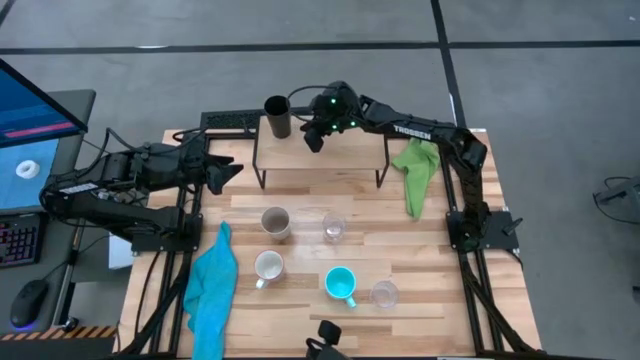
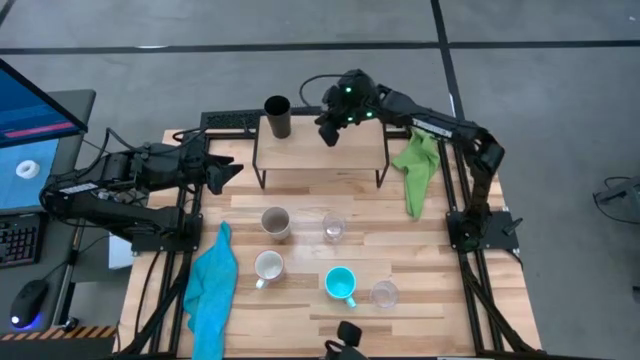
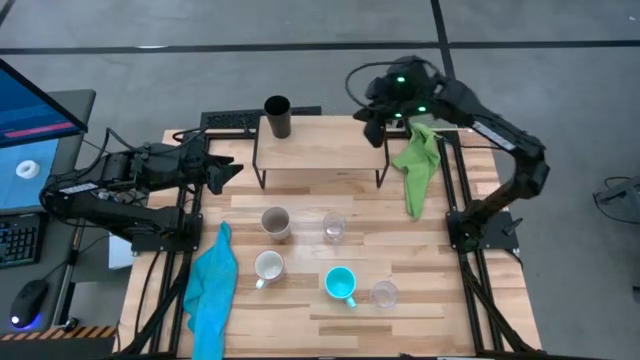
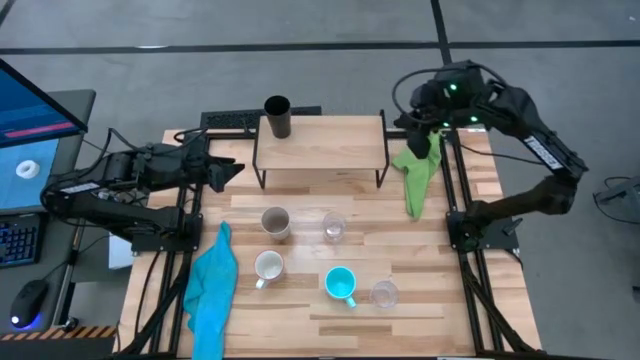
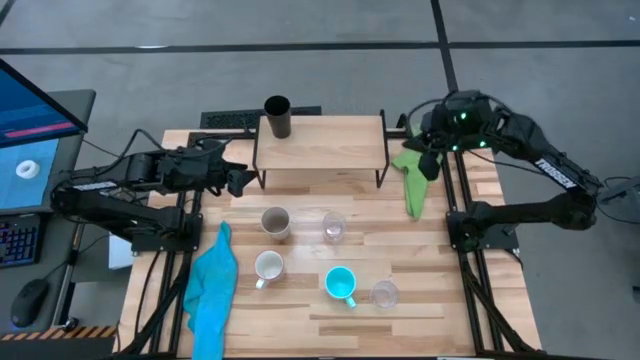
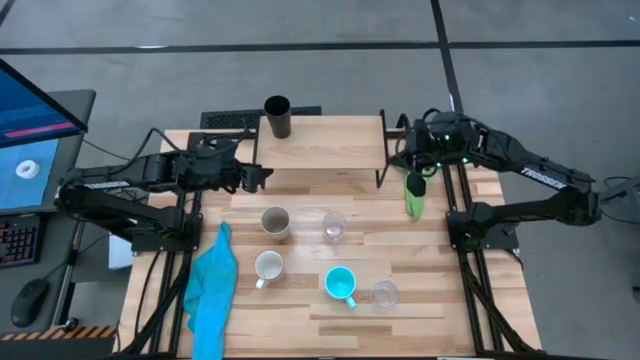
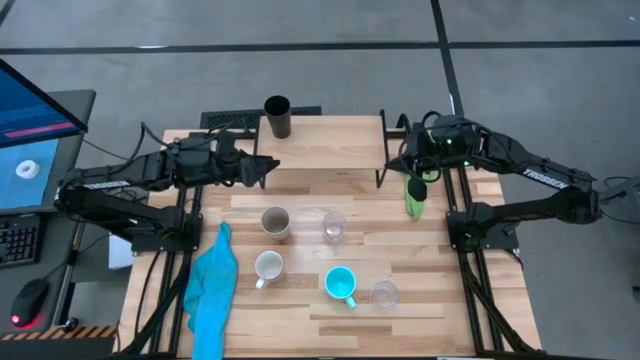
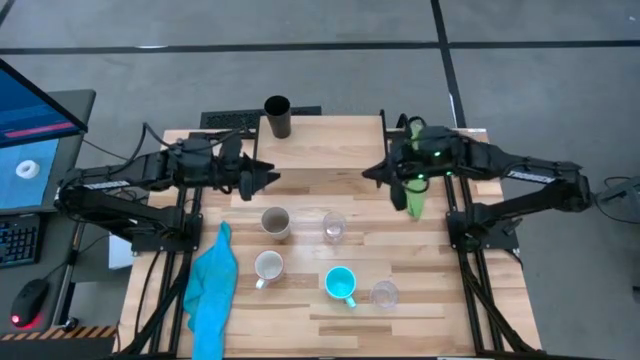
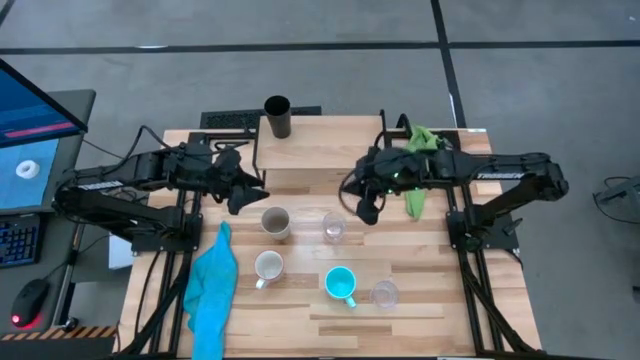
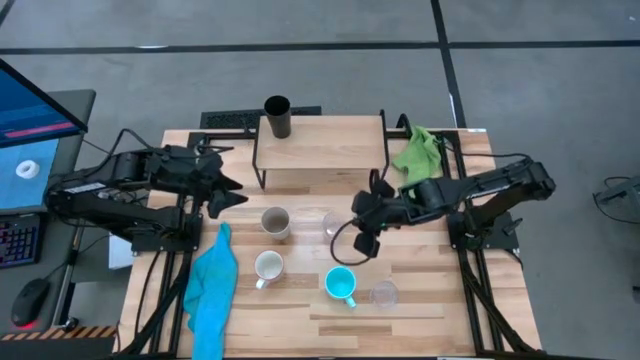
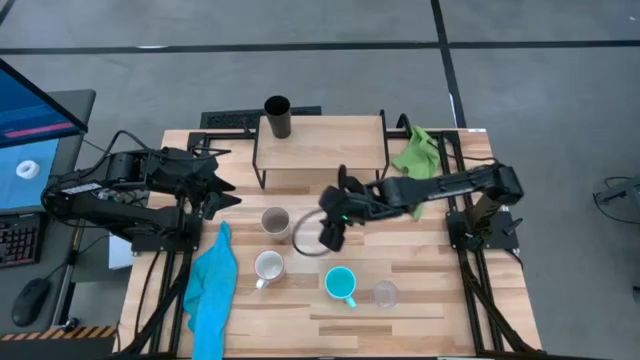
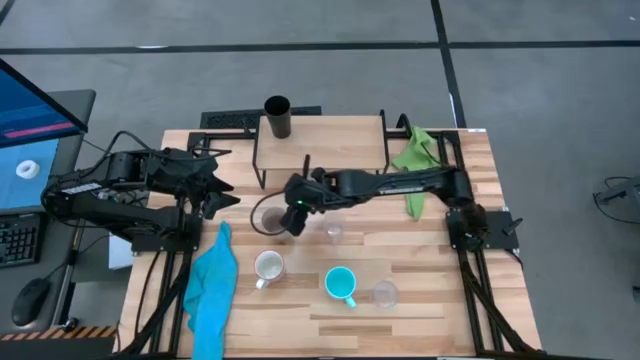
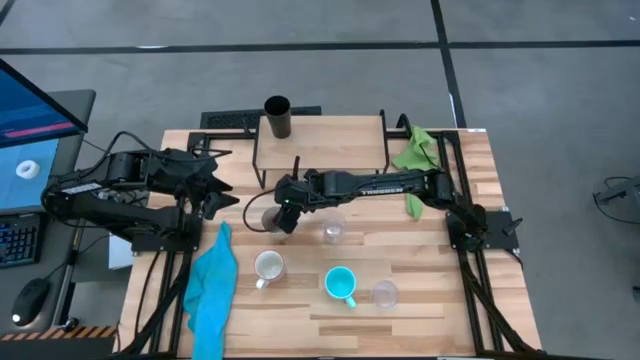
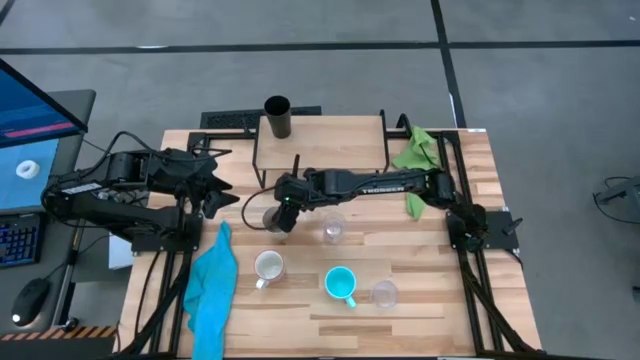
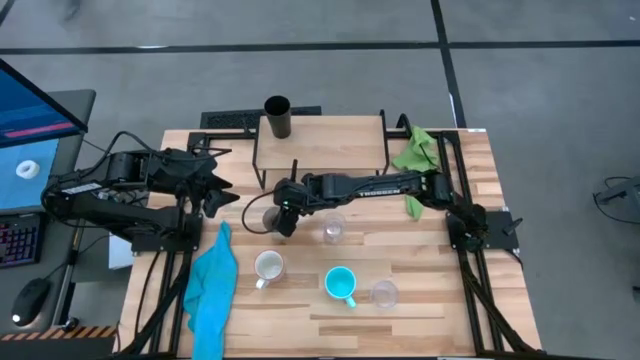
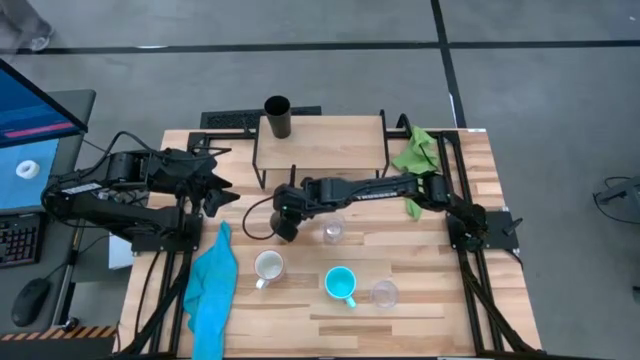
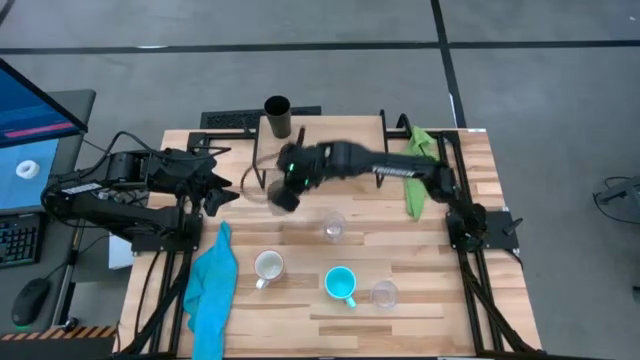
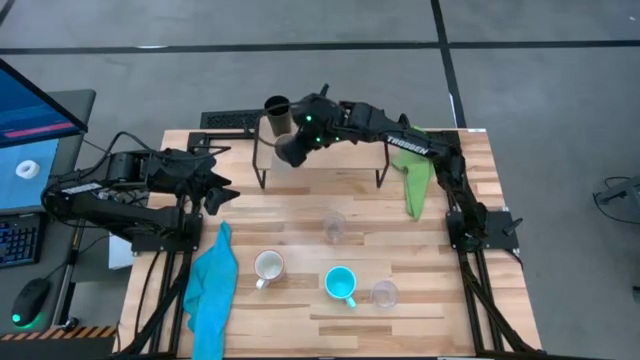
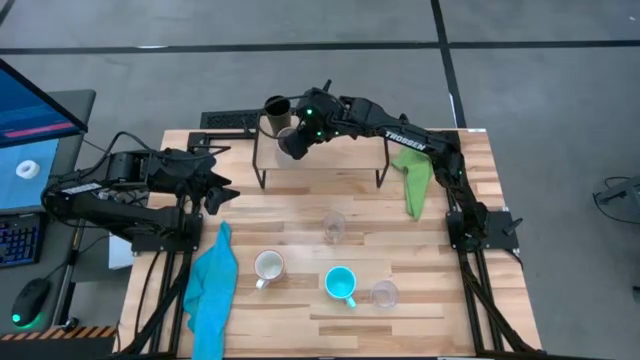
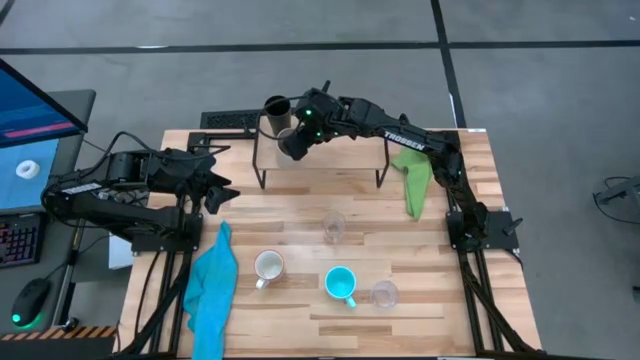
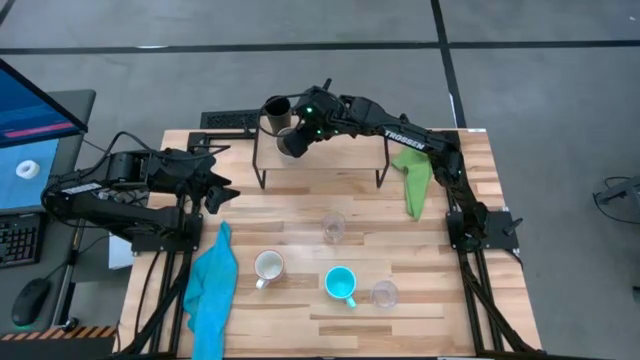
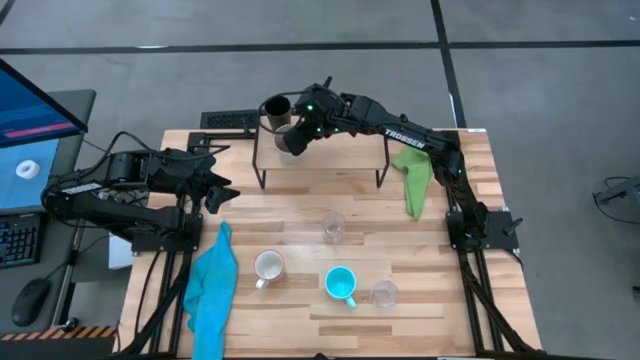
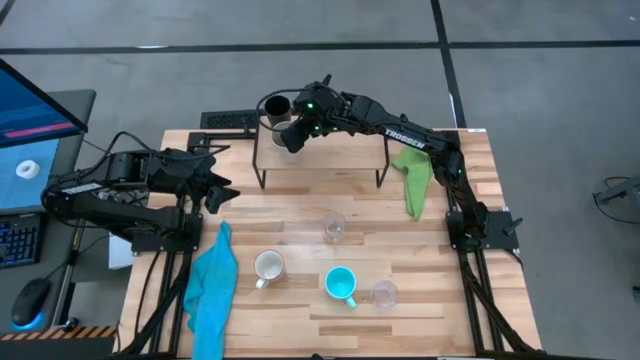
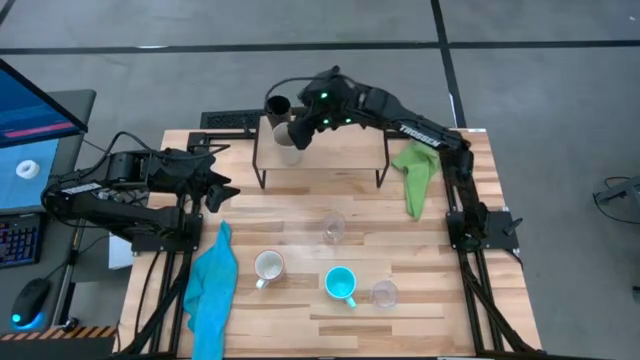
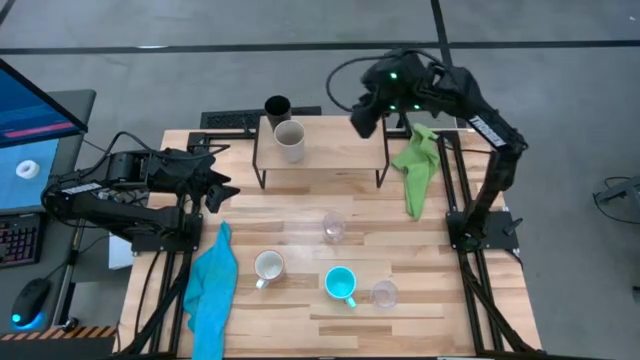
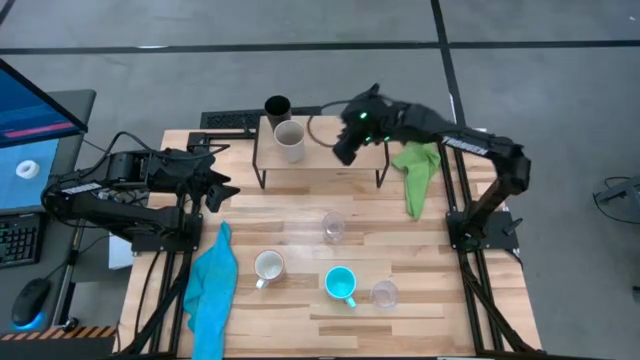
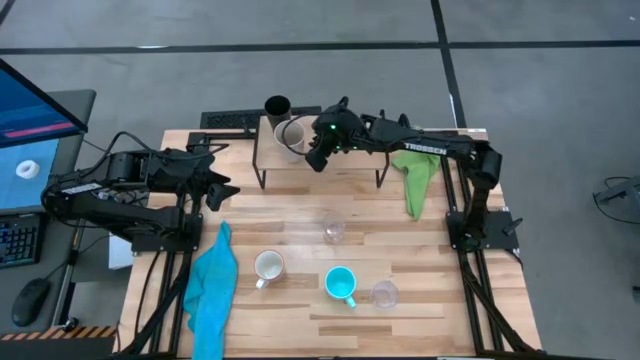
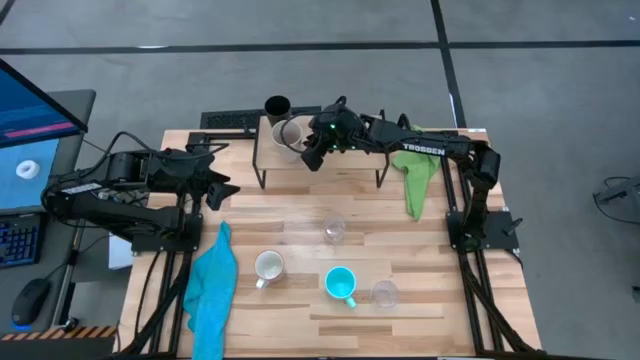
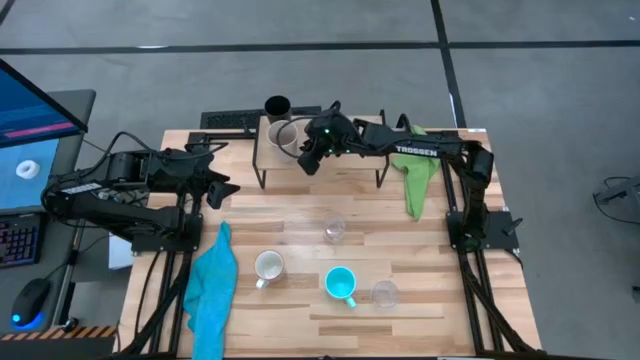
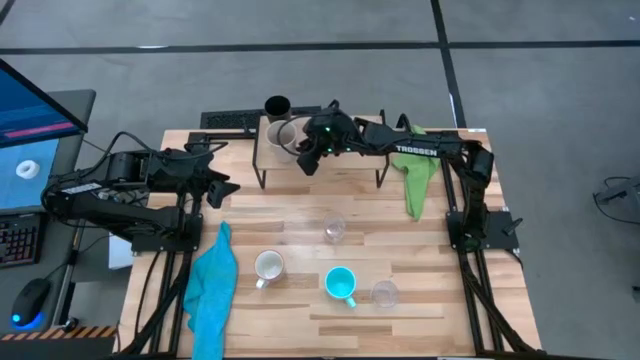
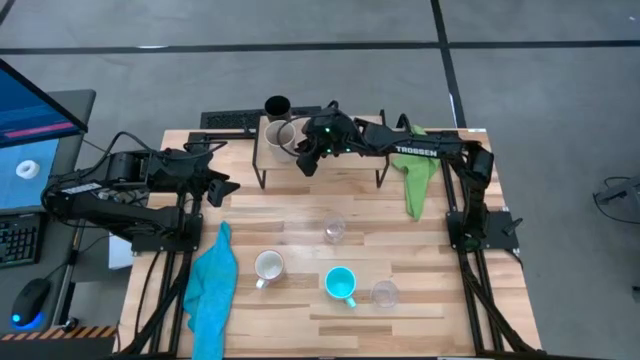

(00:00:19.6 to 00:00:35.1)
Task: Stack small to large cups/mugs on shelf
Put the white cup on the shelf

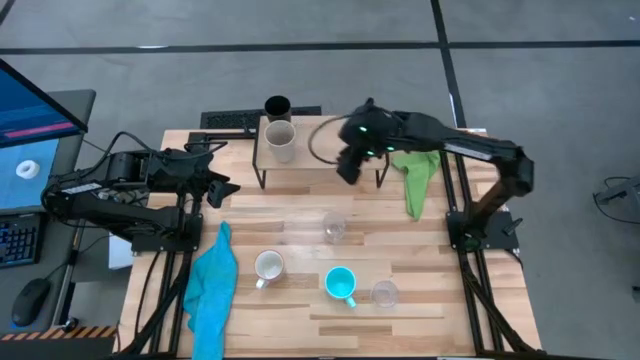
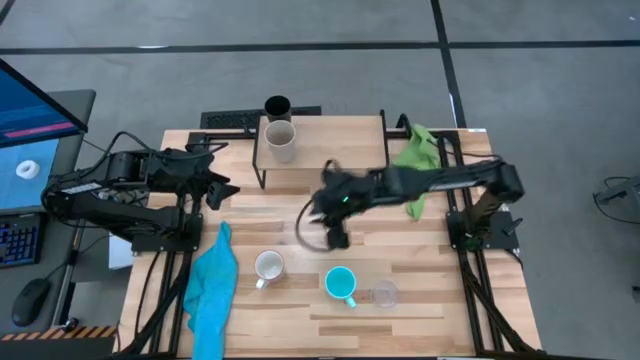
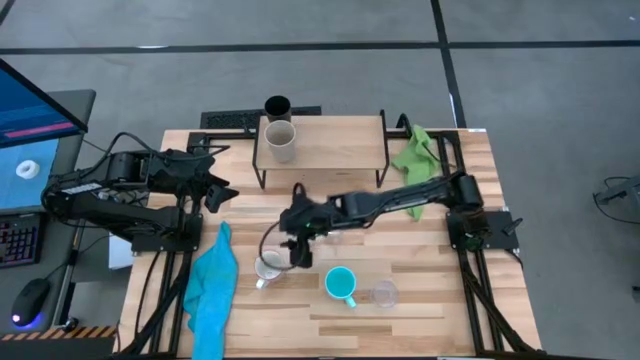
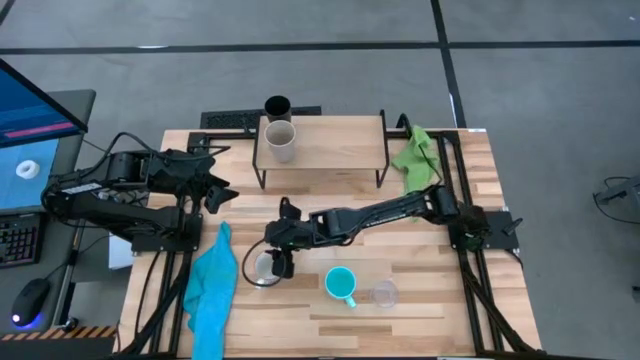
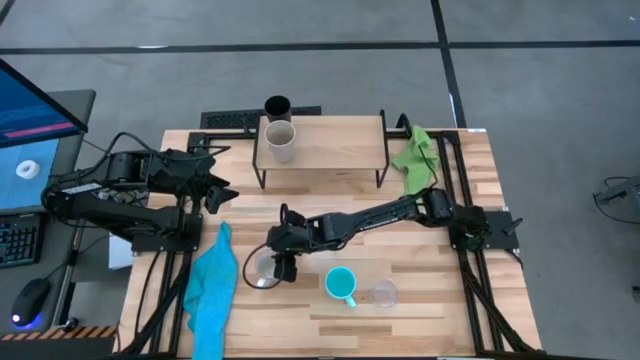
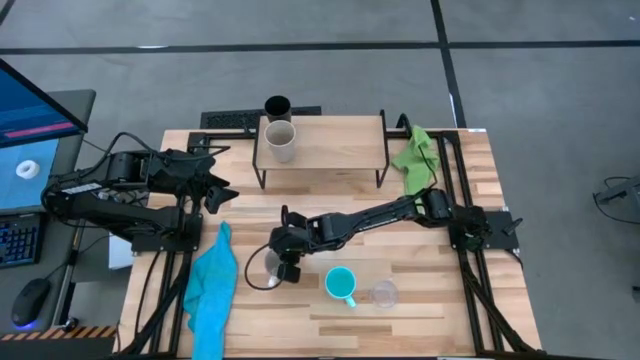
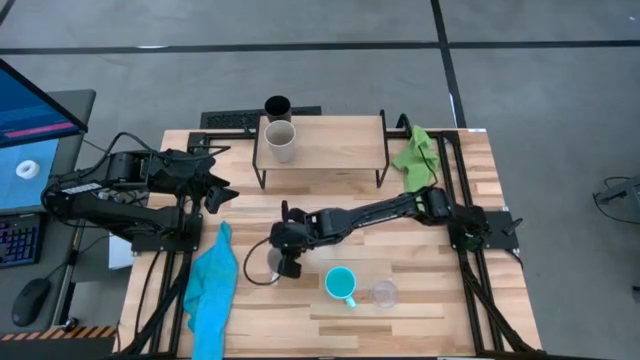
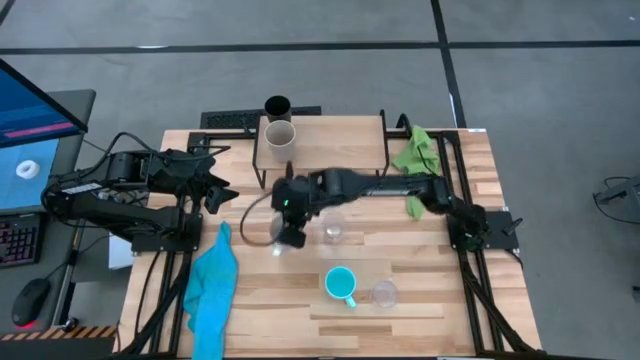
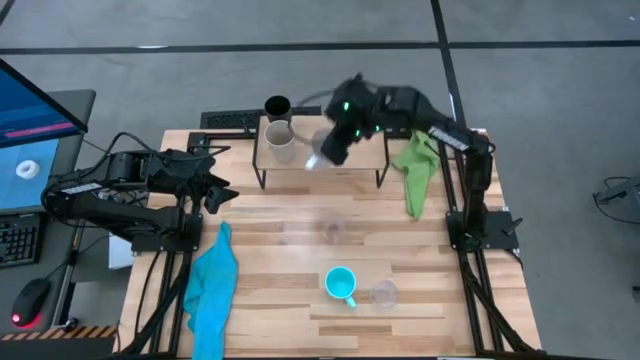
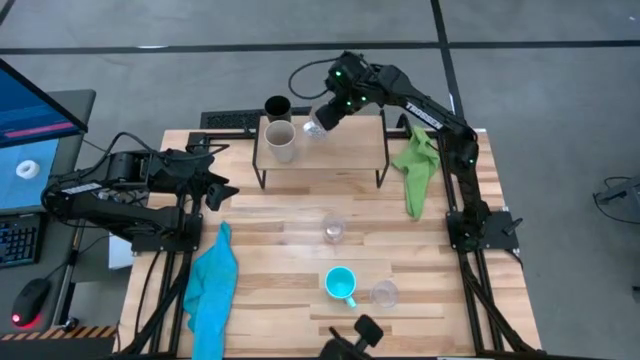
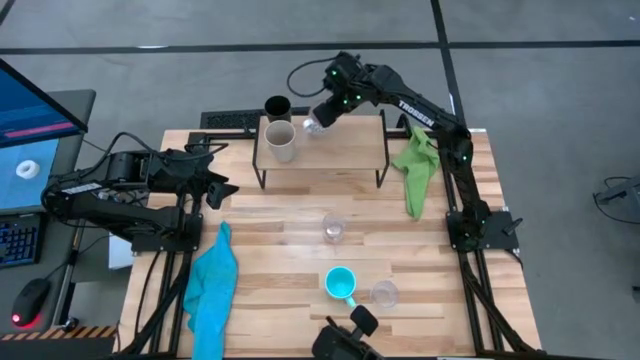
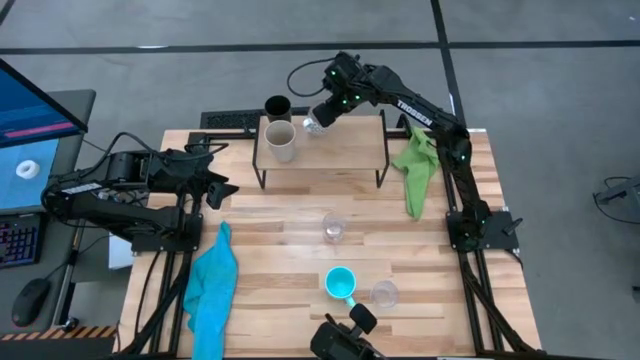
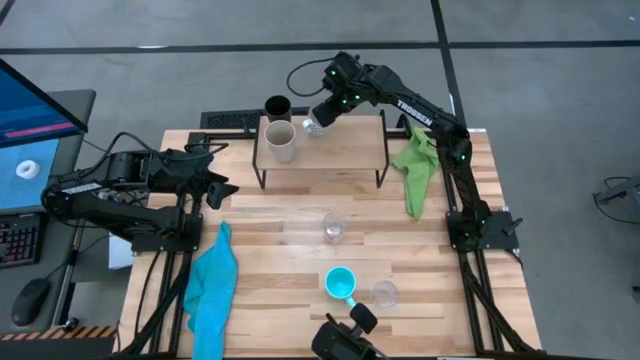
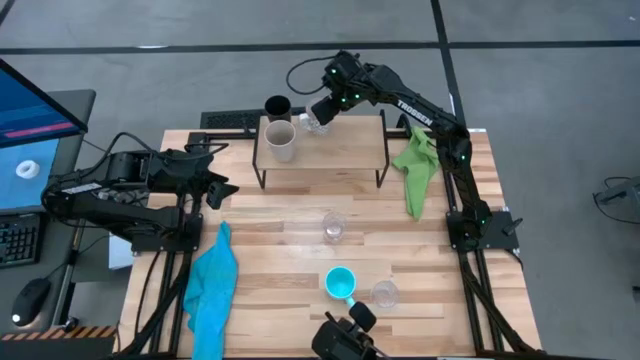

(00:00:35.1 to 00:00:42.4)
Put the white mug on the shelf
